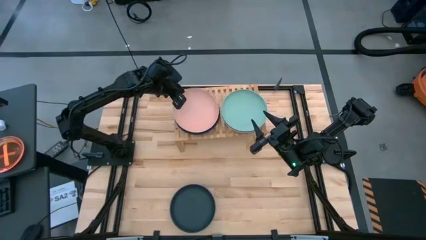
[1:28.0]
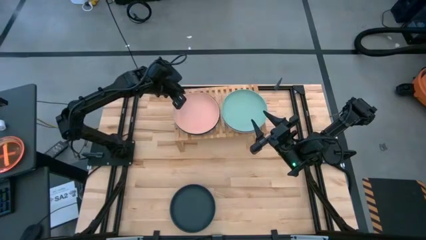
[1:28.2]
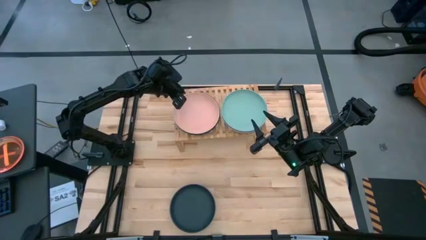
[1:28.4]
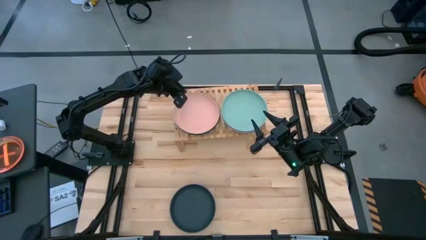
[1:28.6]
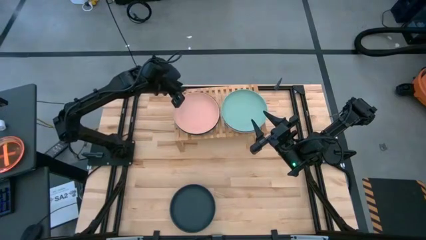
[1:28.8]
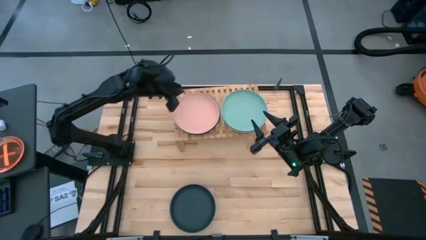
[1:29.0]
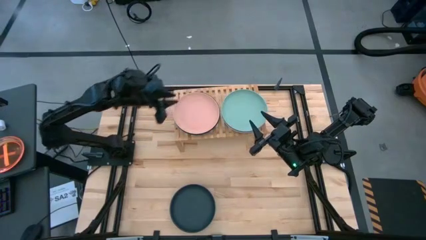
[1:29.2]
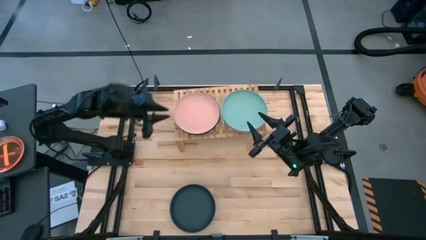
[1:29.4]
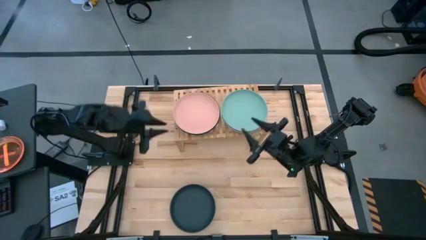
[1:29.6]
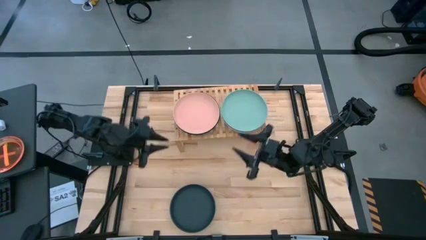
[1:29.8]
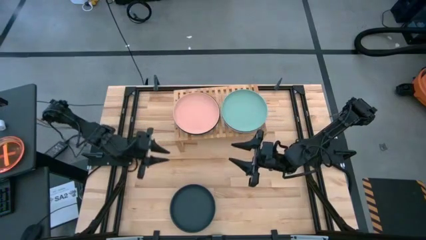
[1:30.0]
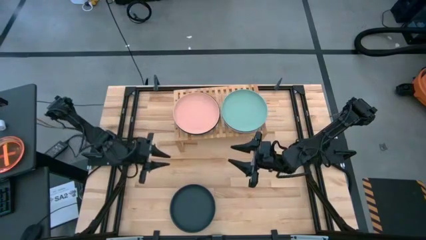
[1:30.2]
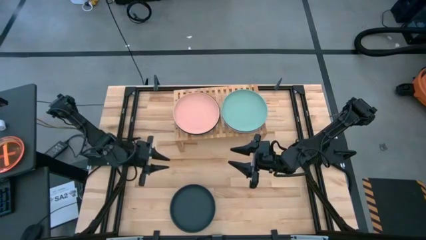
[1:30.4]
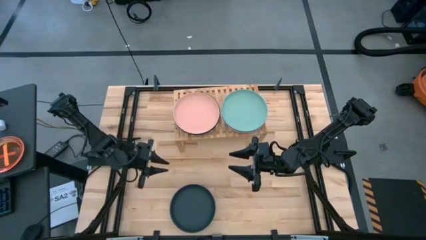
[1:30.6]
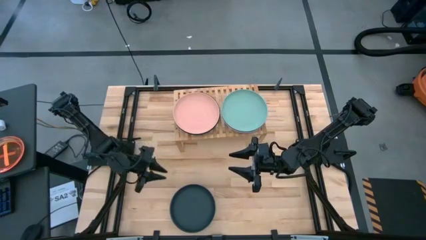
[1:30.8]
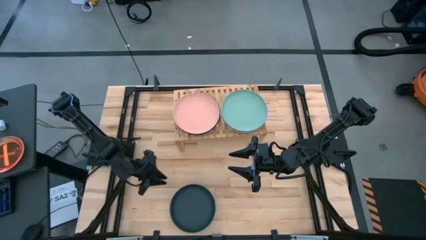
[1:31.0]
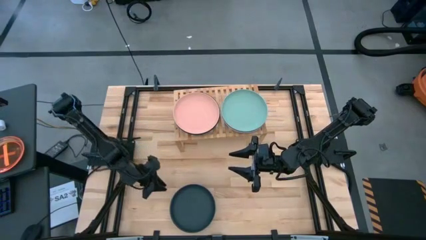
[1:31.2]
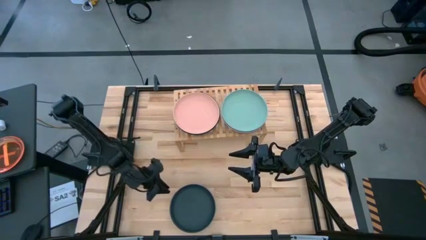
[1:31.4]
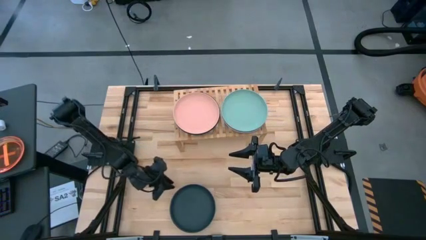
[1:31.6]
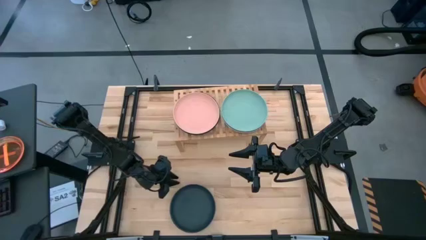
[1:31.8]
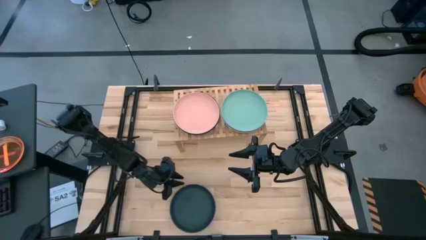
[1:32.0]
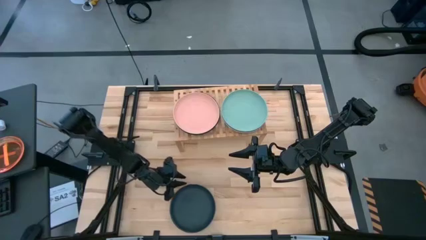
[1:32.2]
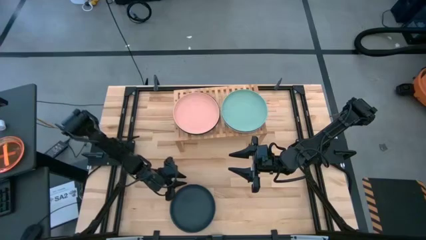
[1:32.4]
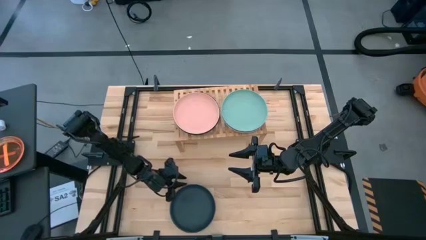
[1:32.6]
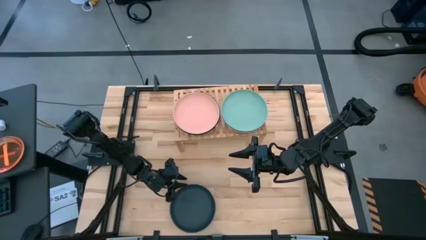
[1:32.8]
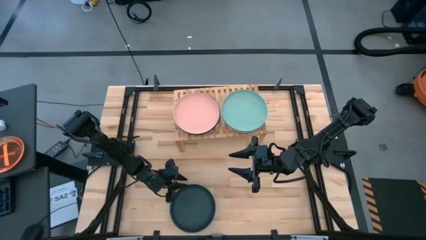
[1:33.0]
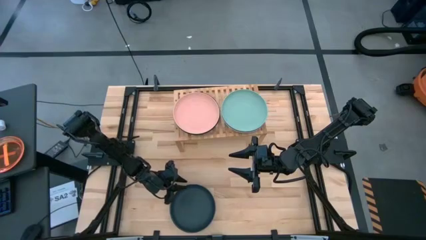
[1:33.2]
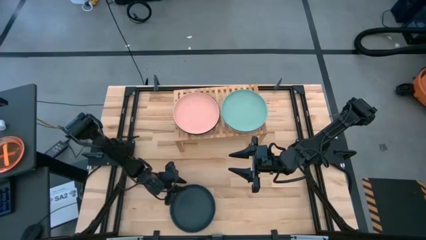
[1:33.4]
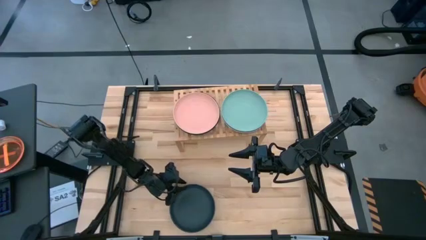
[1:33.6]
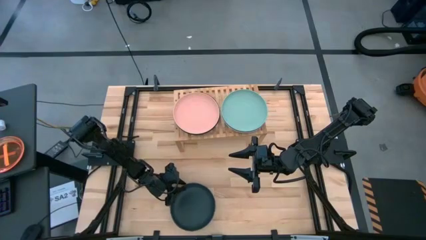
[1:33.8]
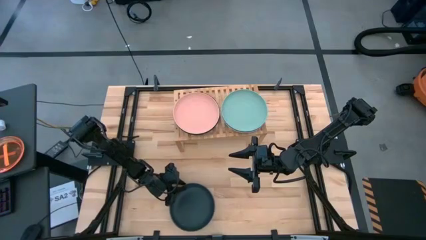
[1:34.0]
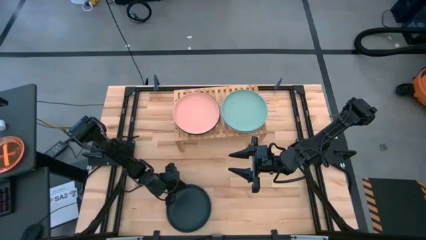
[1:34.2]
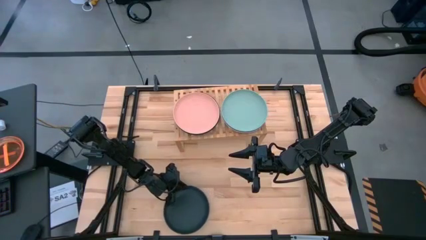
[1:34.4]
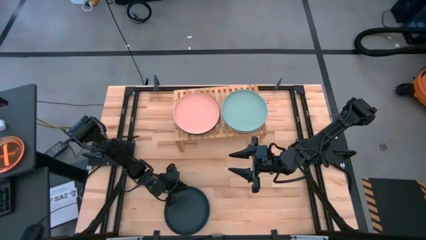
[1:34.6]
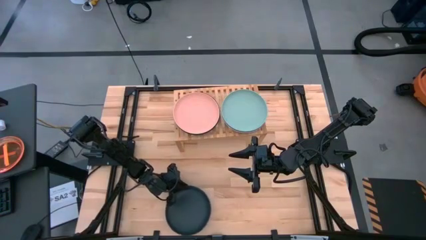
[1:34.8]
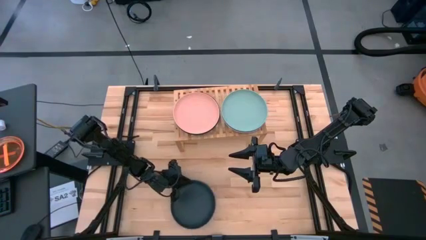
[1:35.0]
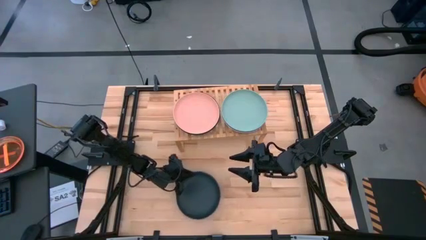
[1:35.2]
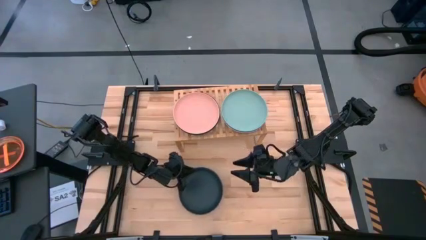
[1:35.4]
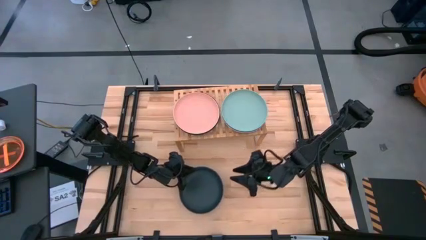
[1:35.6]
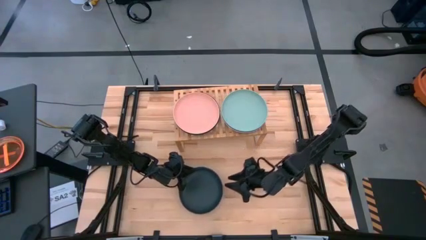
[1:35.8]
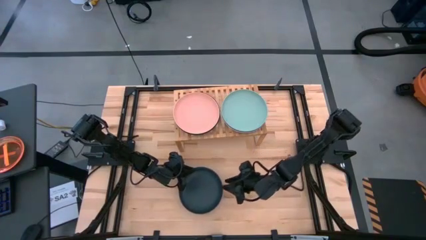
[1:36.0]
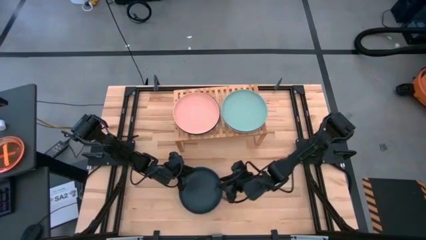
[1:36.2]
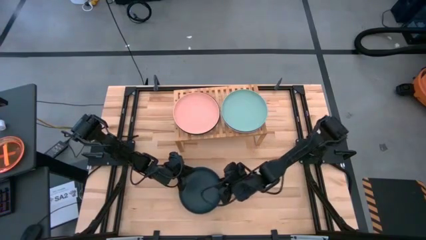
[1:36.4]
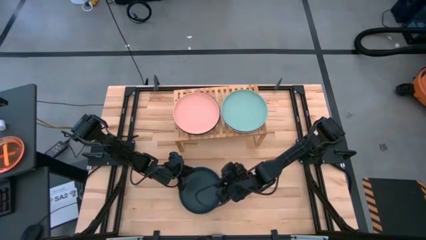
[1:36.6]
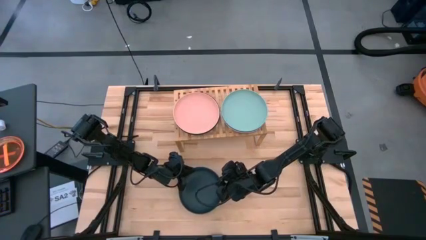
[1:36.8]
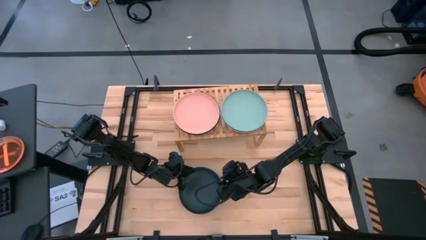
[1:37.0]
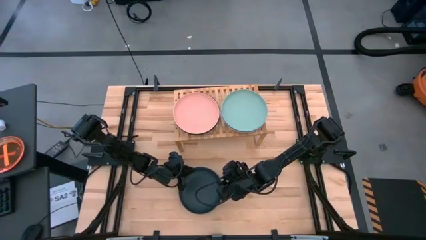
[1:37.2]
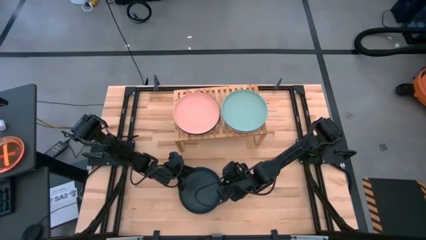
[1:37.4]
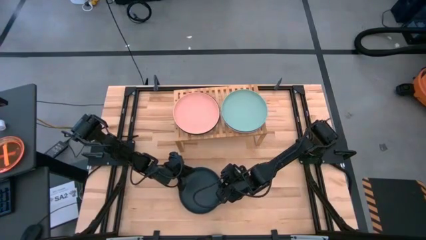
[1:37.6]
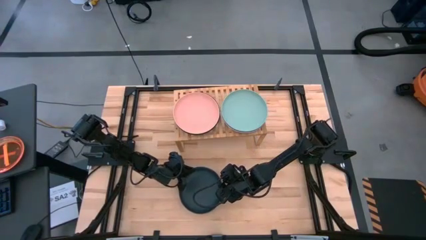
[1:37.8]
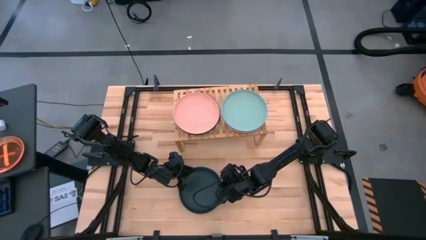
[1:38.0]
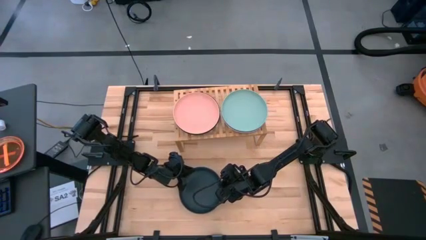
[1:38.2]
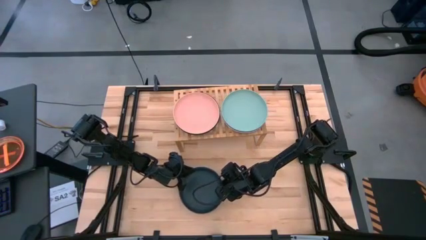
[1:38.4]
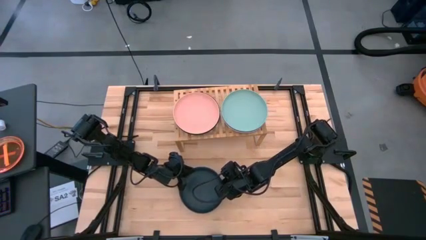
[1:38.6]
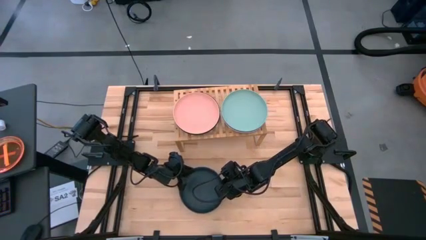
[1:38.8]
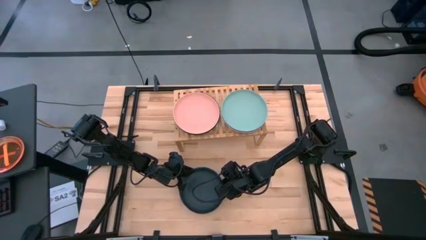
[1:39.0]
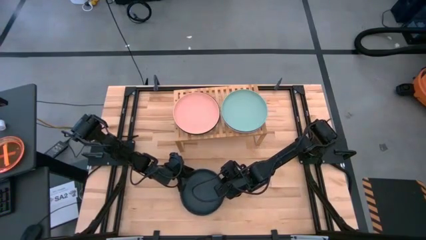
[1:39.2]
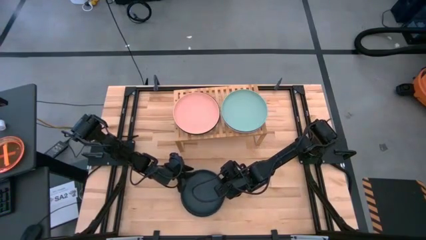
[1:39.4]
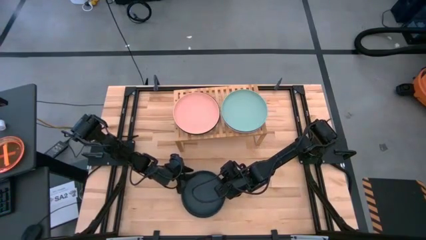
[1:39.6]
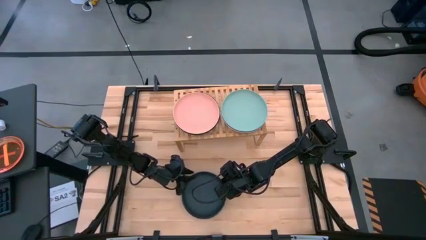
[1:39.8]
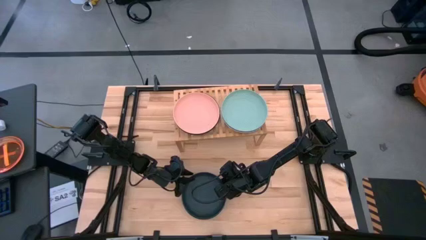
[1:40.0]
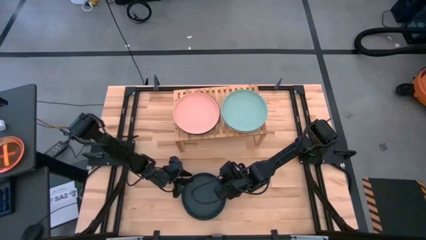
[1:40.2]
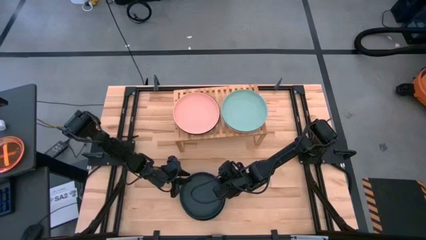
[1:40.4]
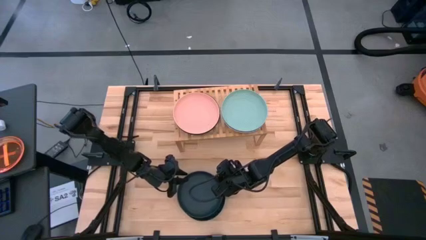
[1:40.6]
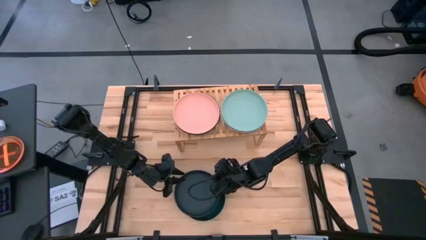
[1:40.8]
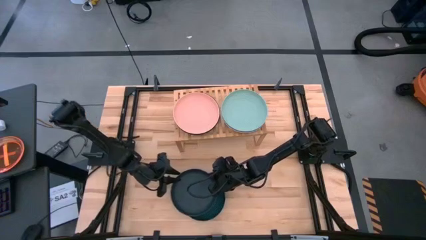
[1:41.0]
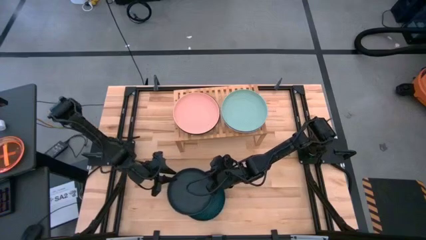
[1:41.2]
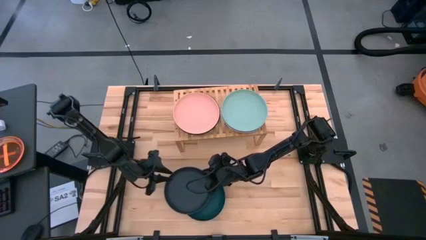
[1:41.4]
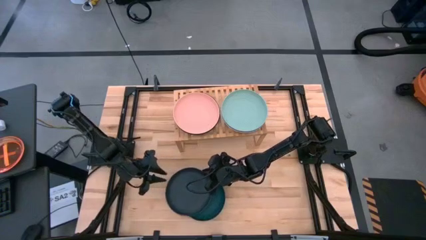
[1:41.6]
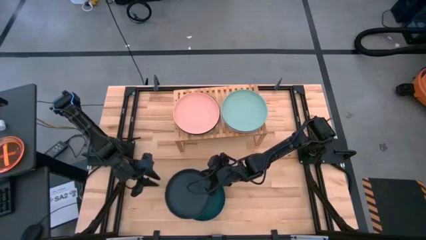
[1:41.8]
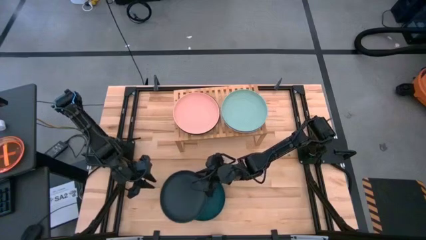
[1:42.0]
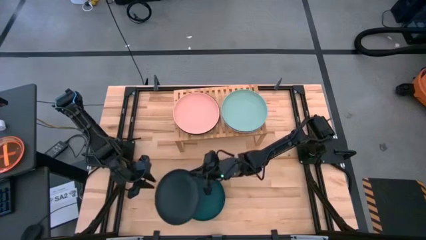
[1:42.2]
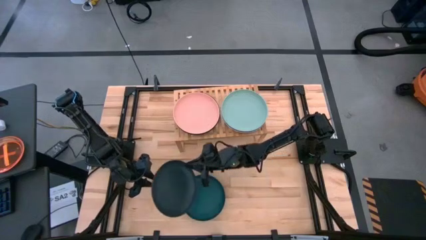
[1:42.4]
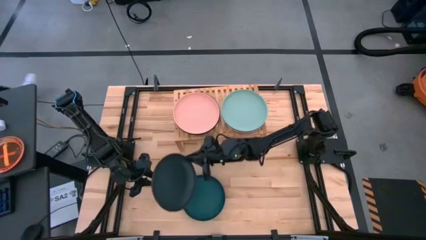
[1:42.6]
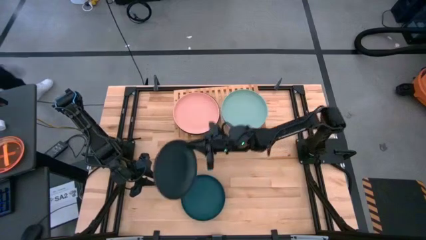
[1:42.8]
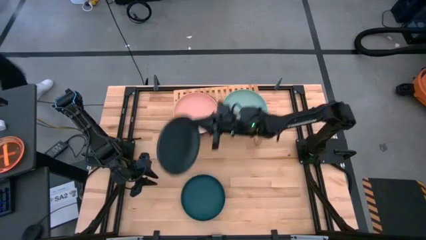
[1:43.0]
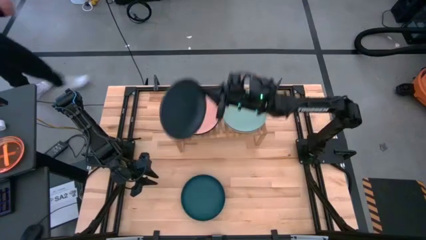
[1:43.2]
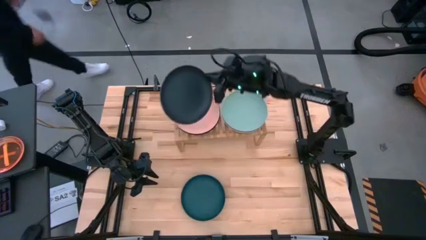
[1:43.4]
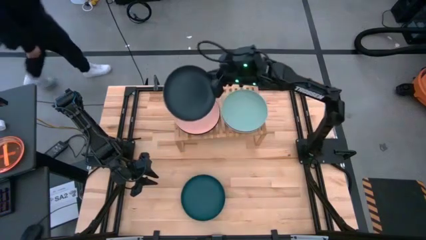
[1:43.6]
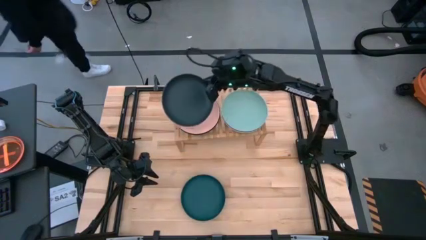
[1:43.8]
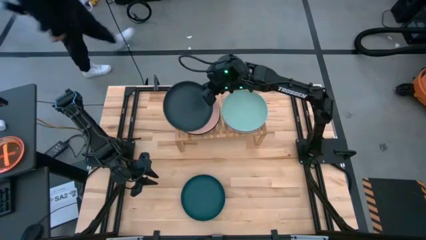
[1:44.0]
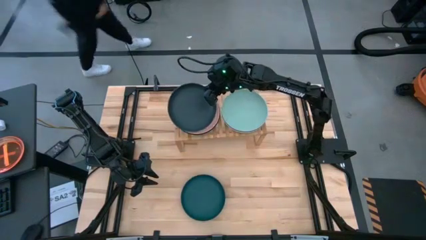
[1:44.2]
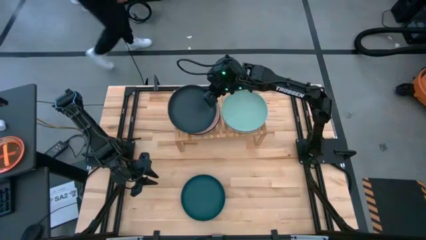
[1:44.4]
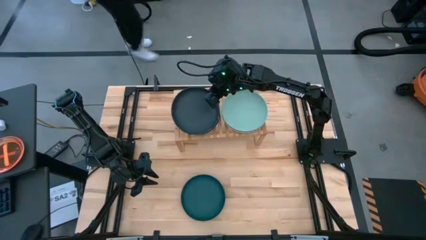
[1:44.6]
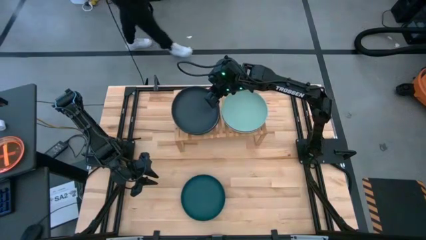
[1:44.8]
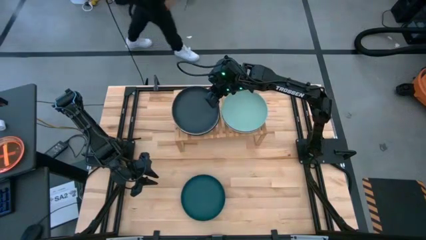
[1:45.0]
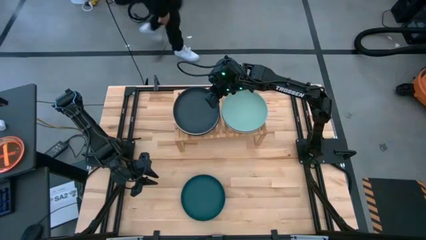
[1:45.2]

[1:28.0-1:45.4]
Task: Place and stack plates onto a shelf
Stack the black plate on top of the pink plate on shelf
